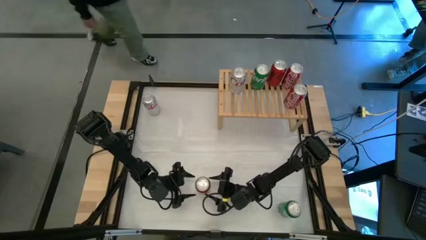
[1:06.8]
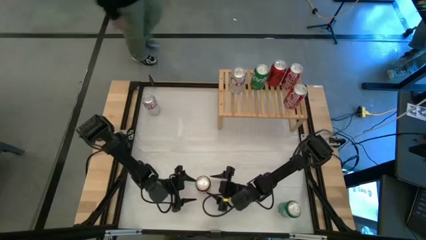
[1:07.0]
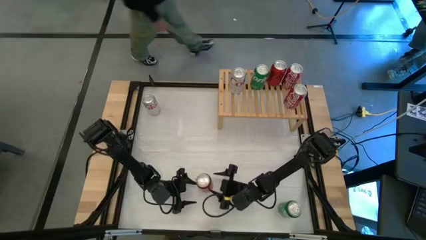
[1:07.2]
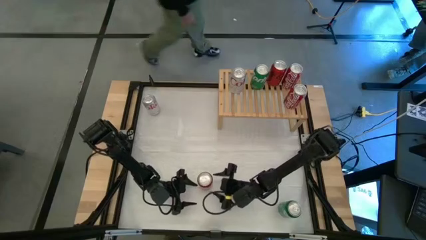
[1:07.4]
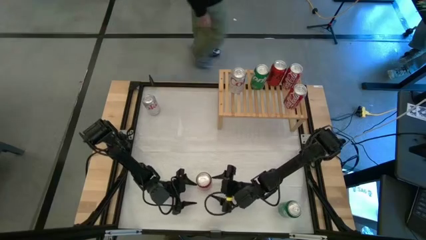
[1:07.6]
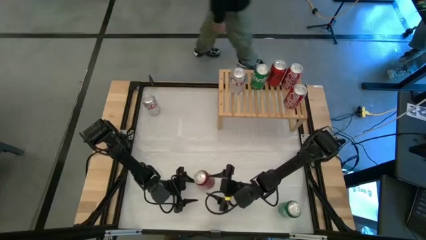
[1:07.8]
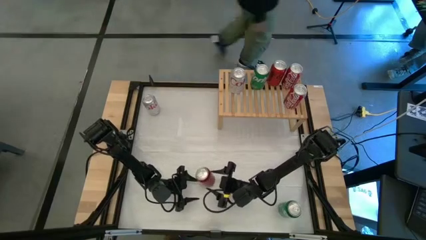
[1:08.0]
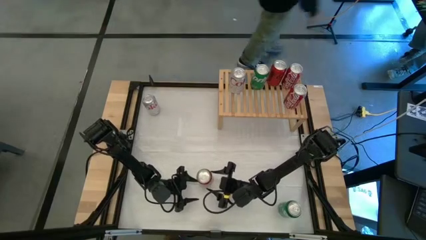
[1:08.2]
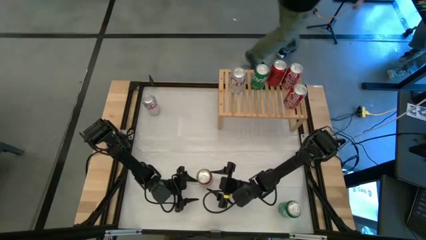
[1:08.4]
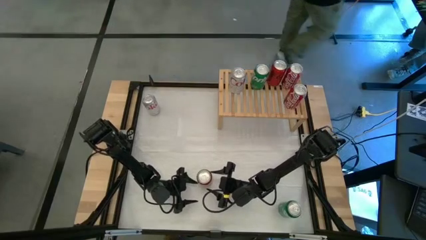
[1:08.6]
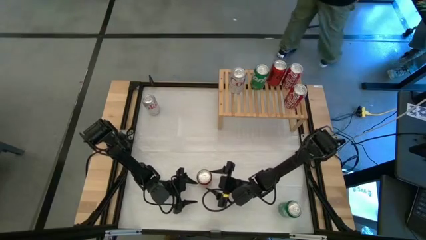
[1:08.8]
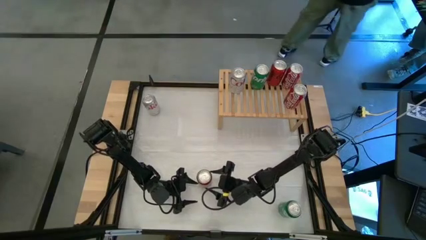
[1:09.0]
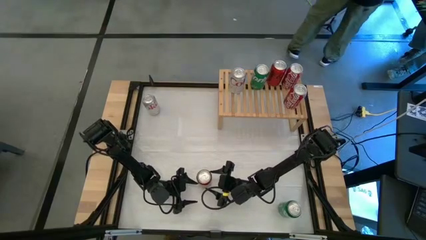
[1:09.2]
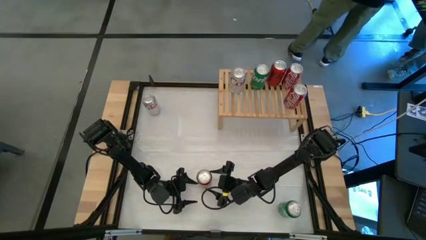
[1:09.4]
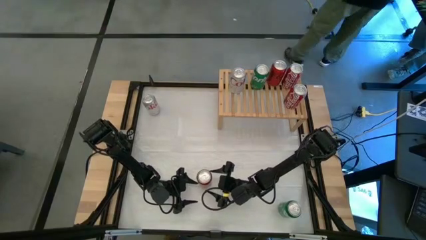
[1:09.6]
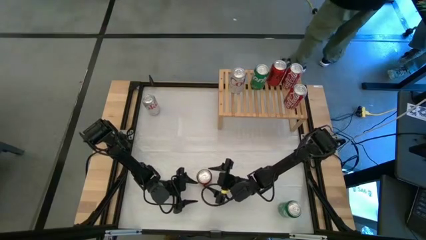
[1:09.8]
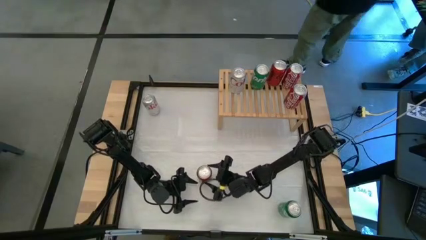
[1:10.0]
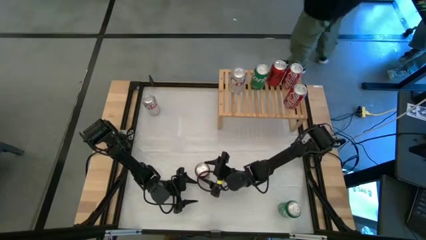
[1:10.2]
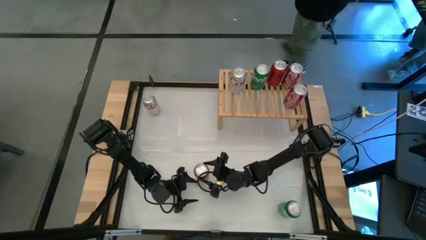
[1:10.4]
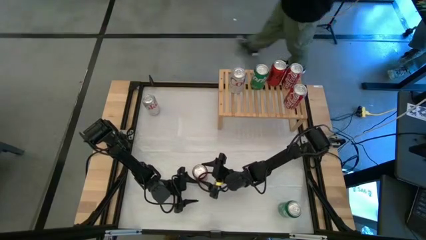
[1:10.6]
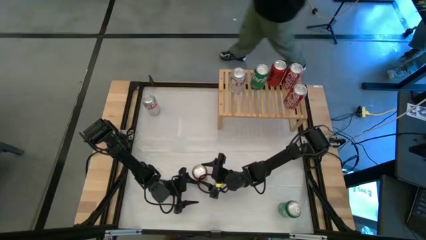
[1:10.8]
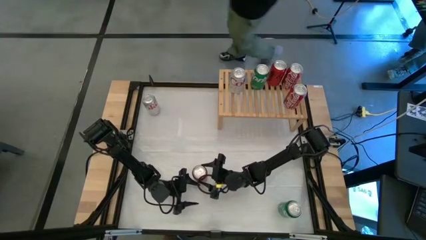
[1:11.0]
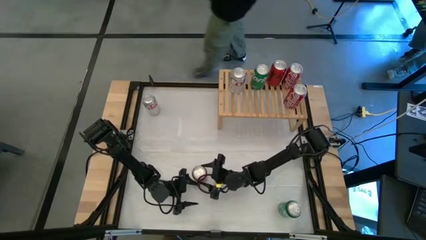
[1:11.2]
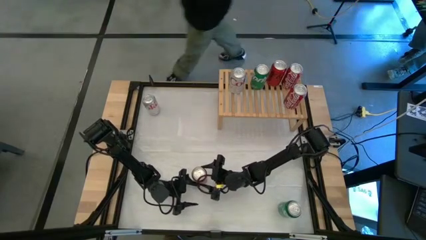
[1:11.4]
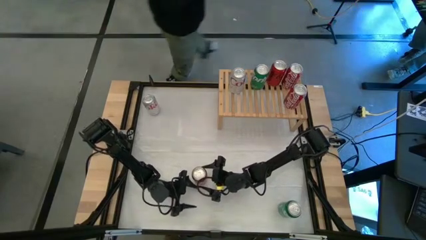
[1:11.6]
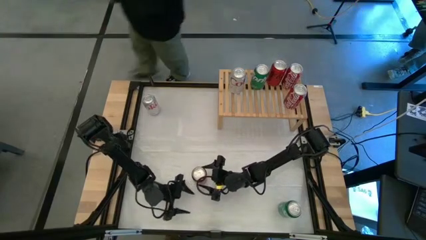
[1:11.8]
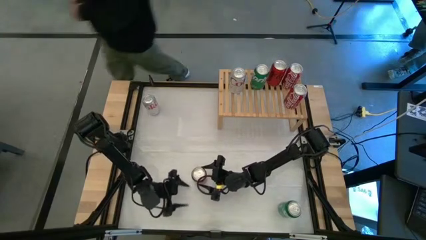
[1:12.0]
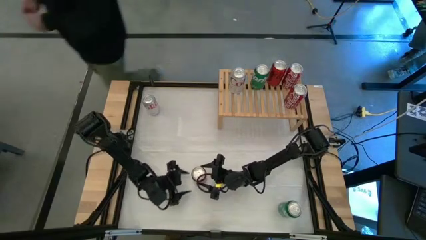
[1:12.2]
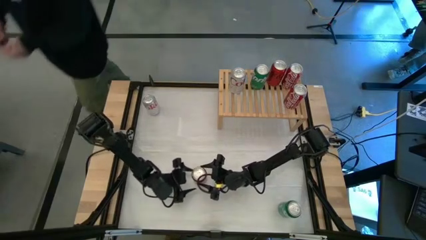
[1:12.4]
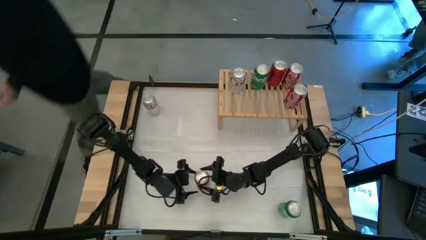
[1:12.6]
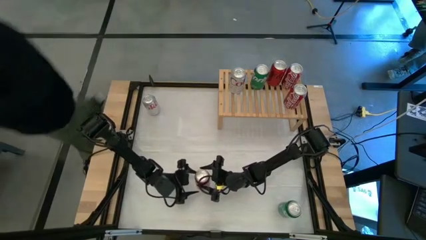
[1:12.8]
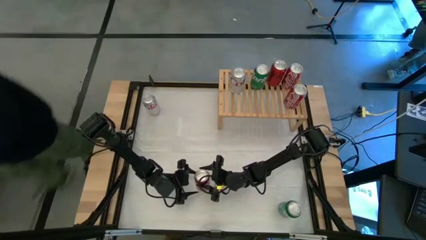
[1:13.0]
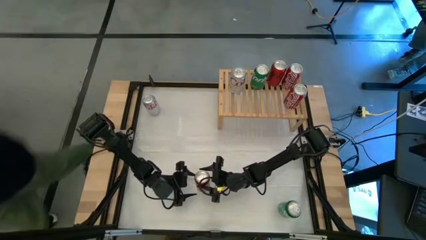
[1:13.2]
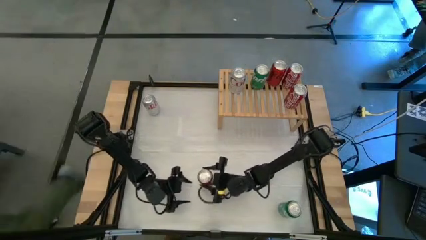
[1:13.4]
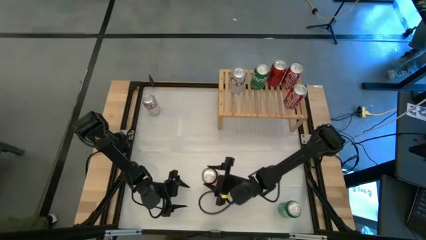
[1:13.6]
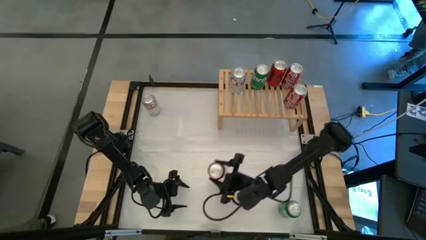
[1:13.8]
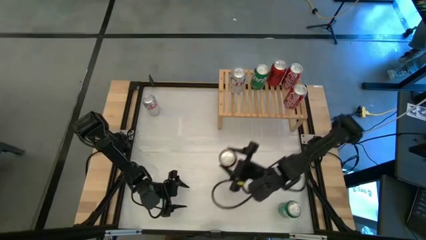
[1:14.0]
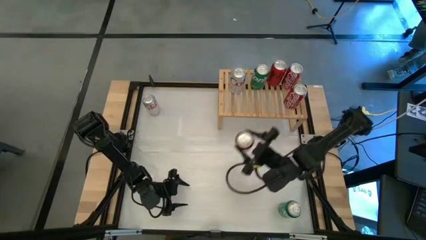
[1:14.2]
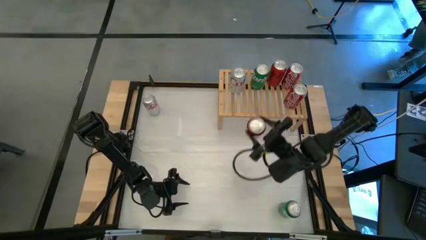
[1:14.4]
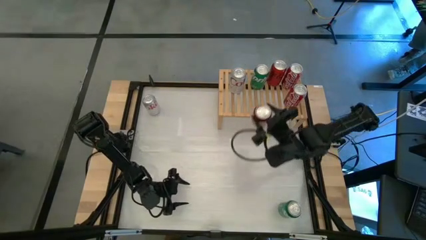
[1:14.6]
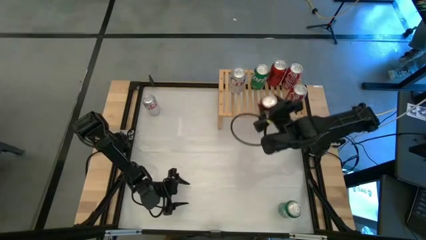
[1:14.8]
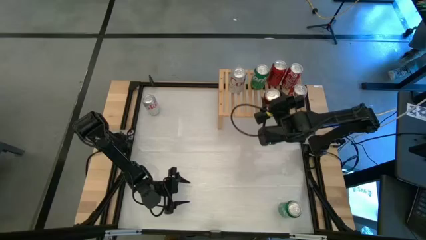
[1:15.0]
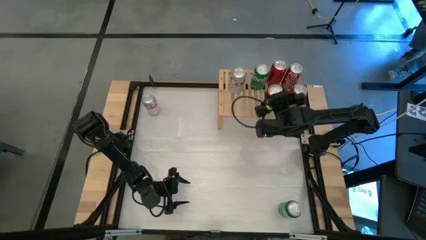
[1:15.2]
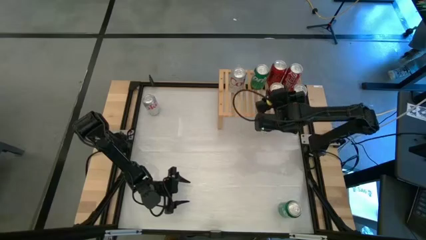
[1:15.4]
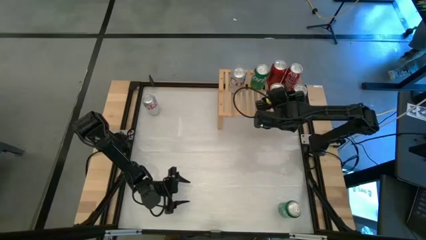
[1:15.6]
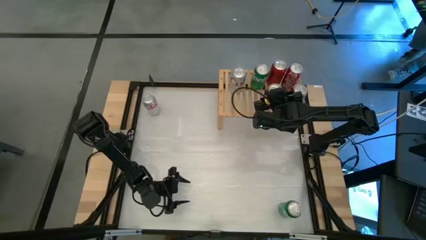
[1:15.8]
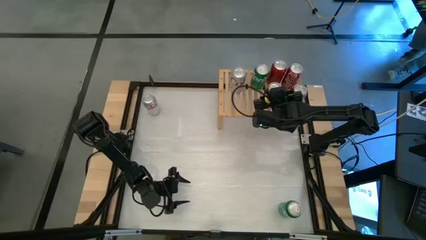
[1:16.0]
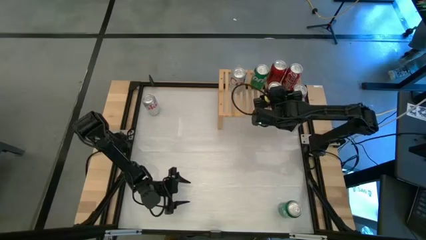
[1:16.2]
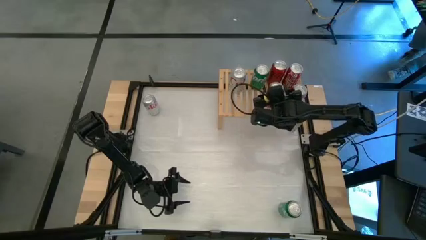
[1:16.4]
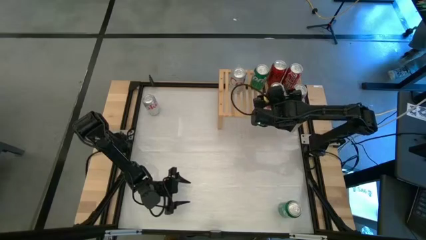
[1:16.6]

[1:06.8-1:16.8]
Task: Place canned beverage on shelf
Put the red black soda can on the shelf aligned with the other red black soda can

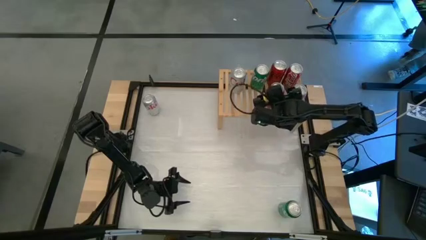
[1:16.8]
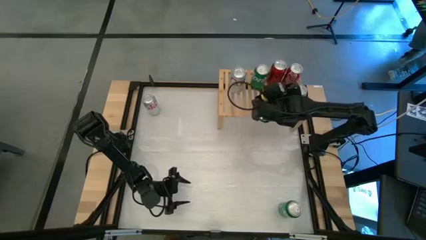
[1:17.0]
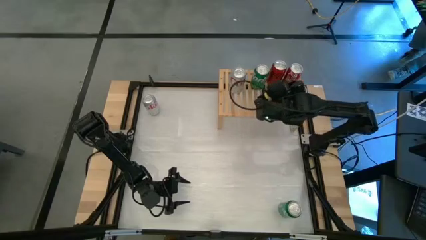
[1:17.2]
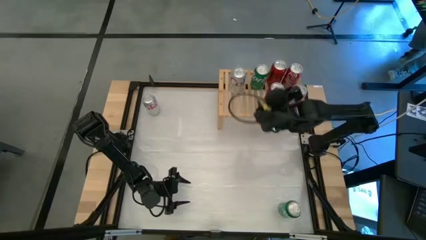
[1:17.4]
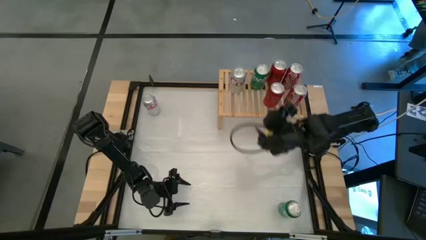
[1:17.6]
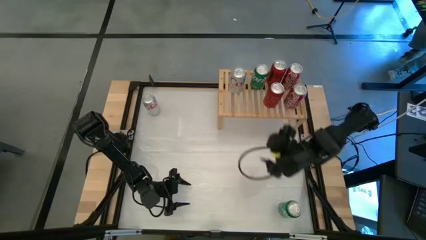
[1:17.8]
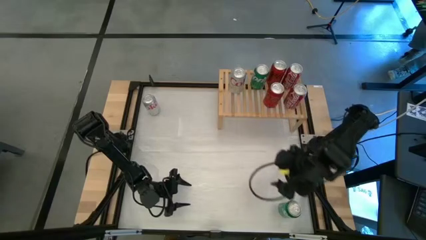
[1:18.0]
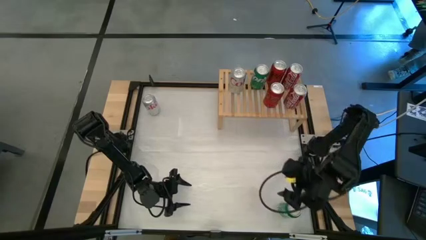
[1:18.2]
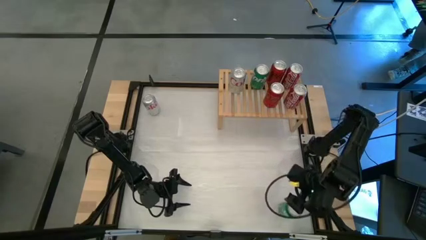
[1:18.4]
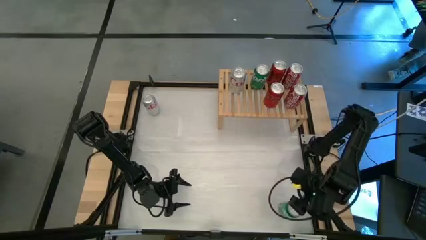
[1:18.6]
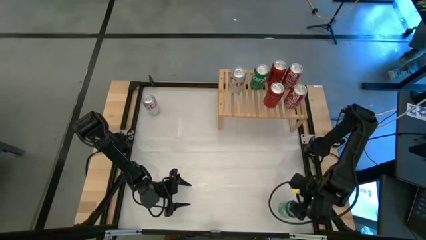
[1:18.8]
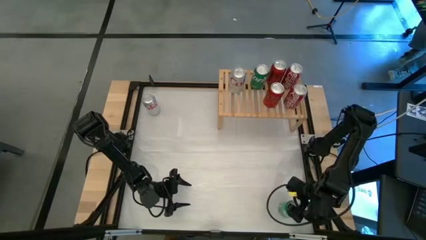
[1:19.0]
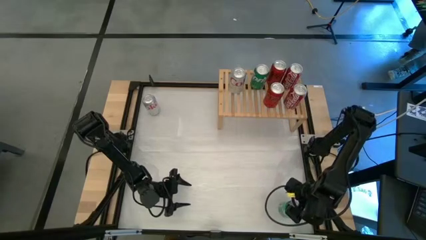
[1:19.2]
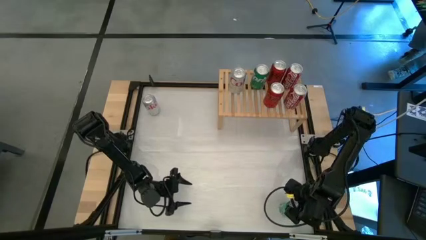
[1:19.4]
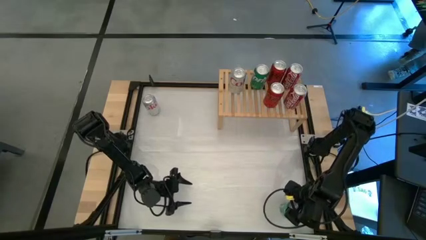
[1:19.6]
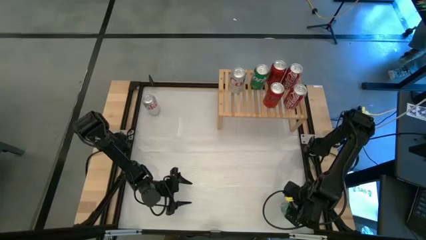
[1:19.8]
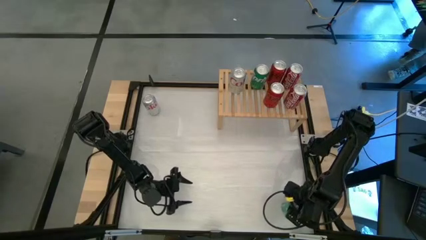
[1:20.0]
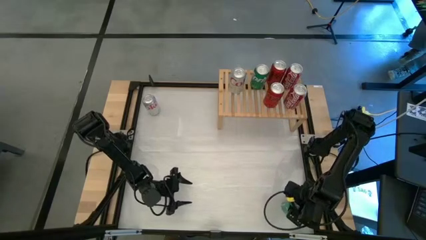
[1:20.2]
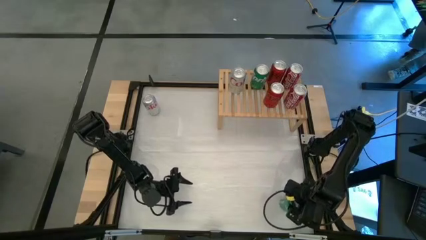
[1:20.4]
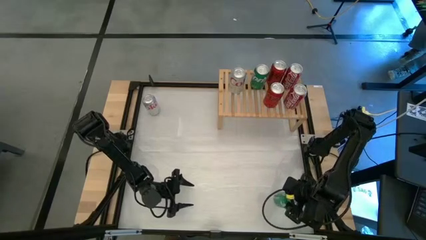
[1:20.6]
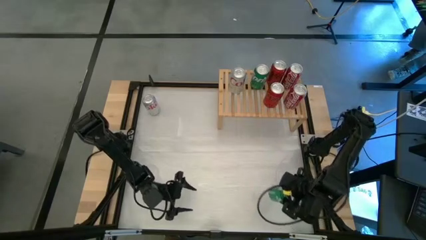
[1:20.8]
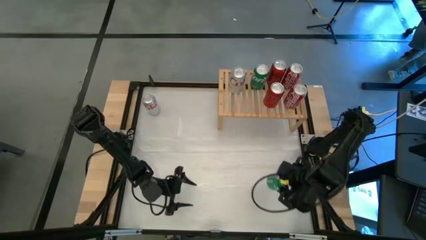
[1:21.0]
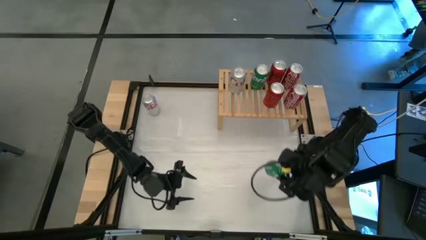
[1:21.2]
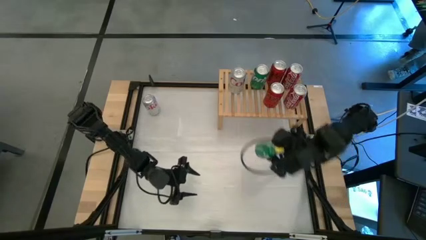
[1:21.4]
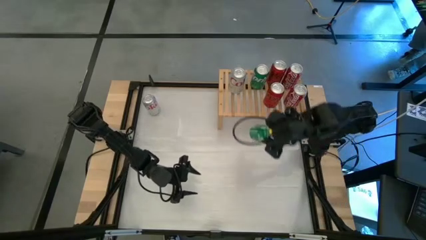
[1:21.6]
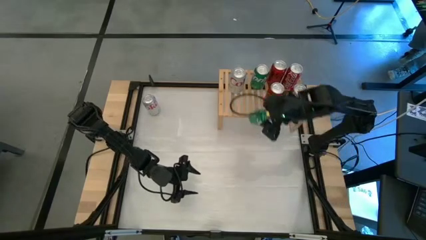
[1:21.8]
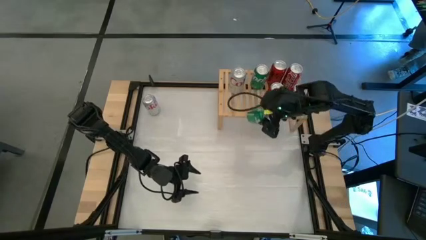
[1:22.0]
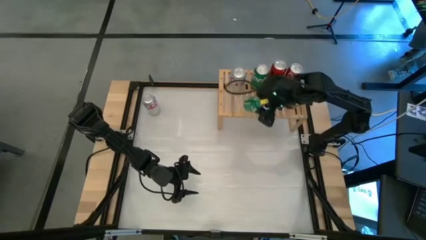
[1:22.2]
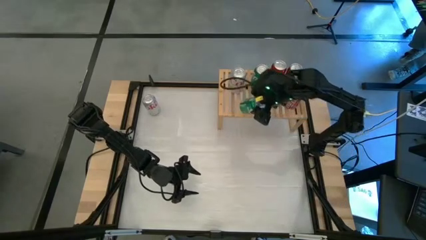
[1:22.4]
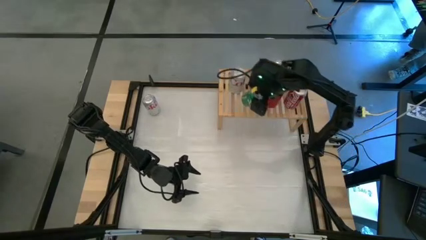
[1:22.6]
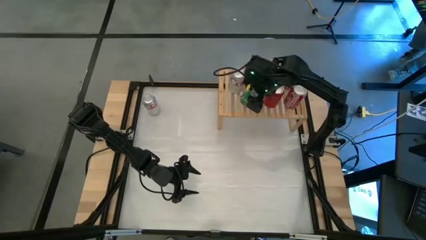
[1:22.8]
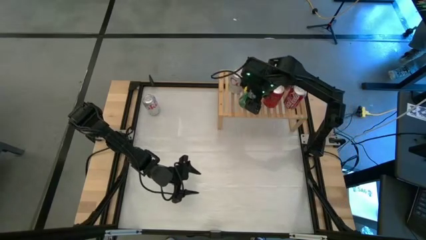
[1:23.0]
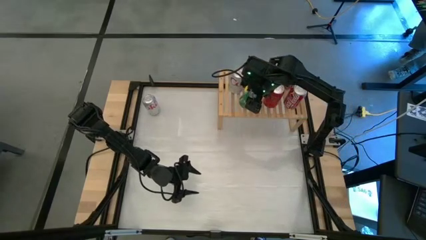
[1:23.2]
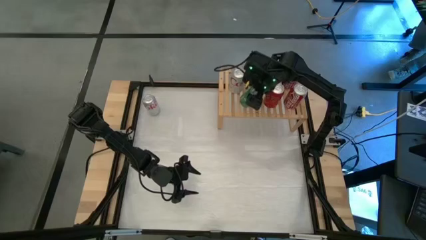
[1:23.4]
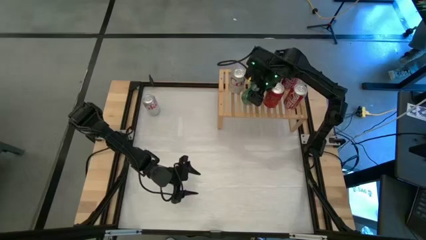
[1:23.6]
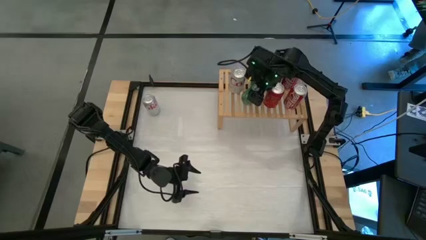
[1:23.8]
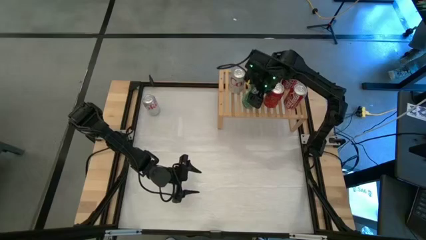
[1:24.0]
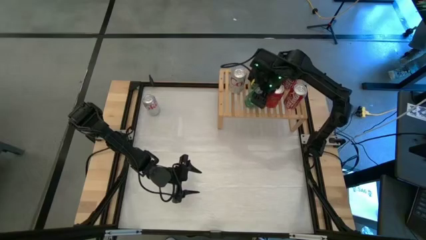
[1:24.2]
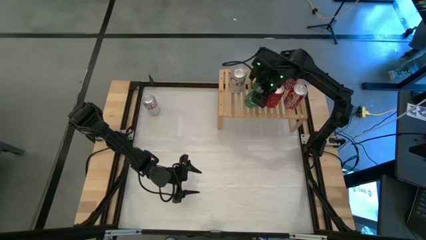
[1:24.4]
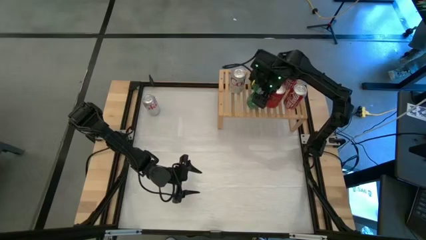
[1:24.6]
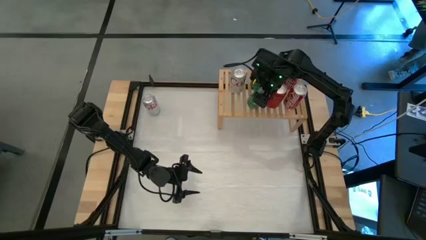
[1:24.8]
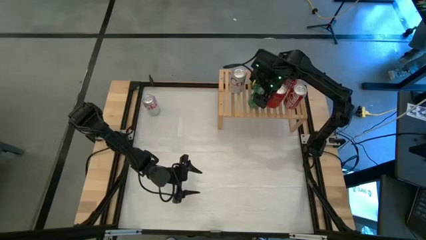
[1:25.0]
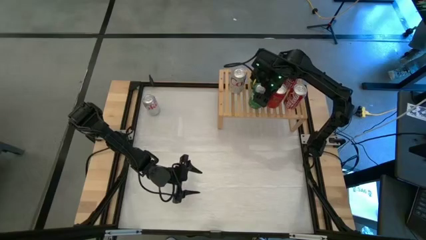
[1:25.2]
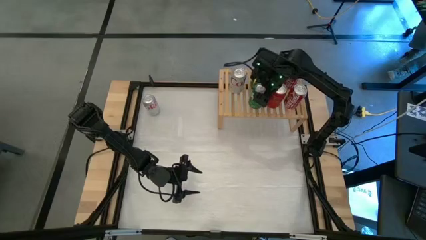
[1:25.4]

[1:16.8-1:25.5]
Put the green soda can on the shelf aligned with the other green soda can
